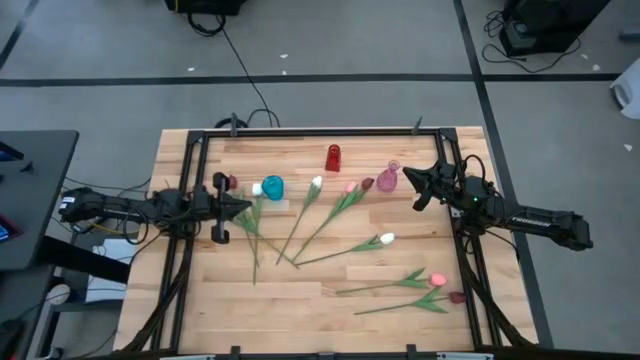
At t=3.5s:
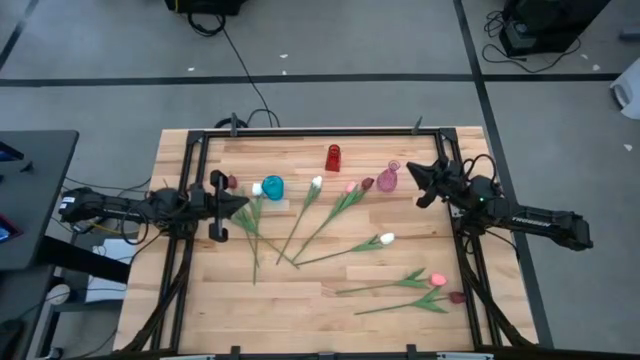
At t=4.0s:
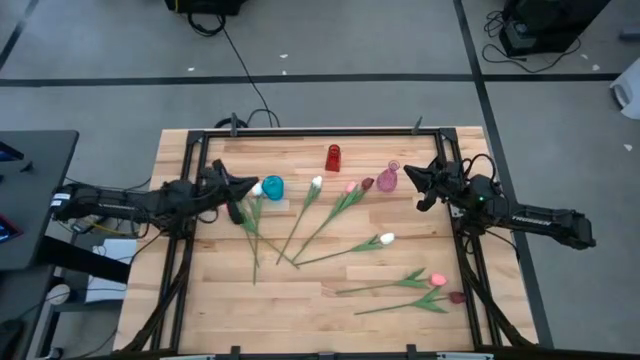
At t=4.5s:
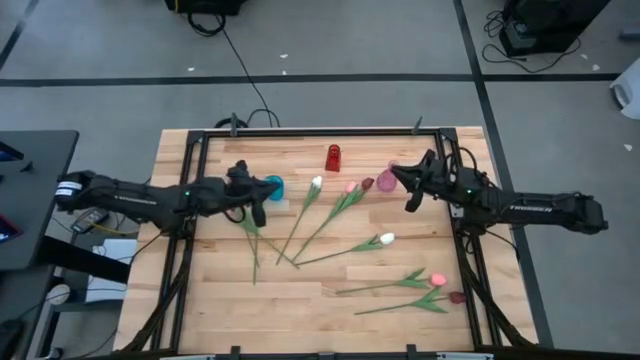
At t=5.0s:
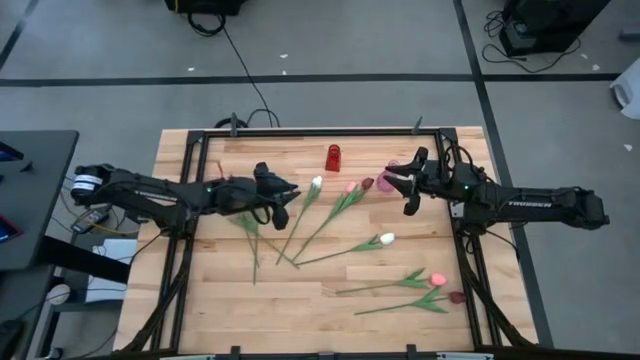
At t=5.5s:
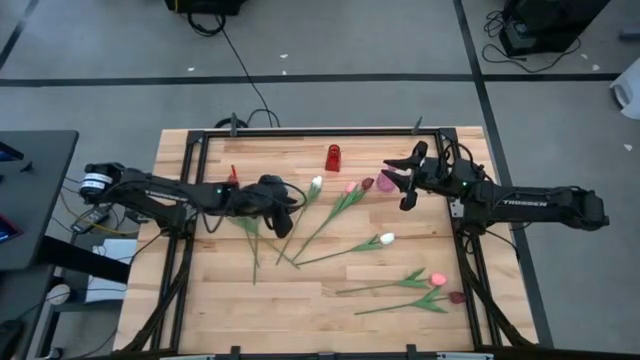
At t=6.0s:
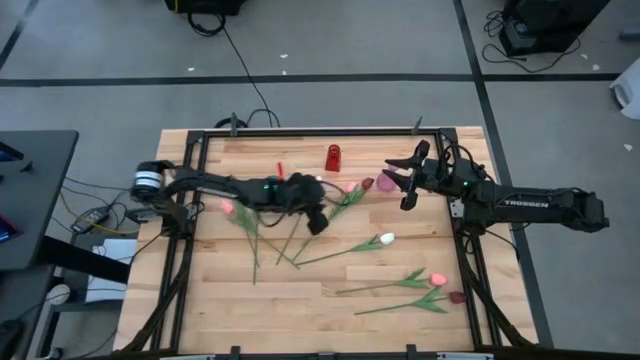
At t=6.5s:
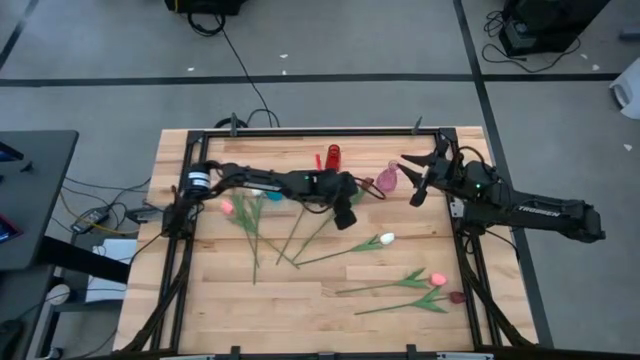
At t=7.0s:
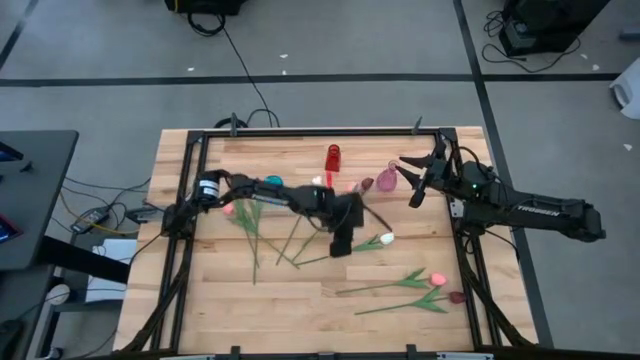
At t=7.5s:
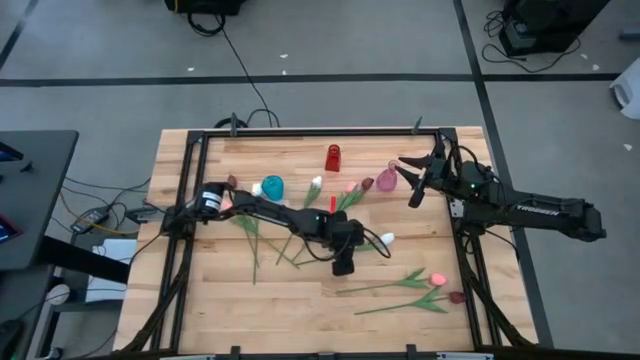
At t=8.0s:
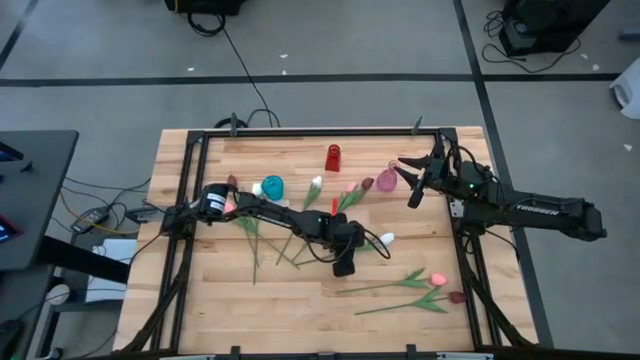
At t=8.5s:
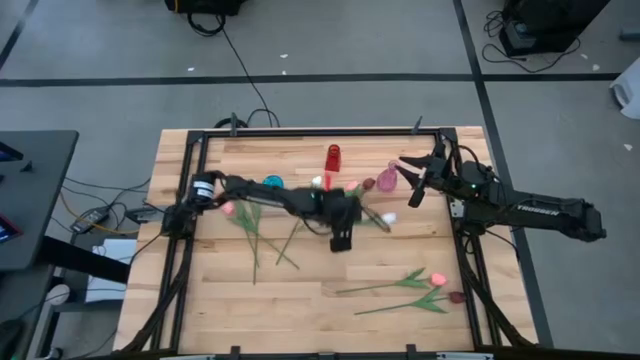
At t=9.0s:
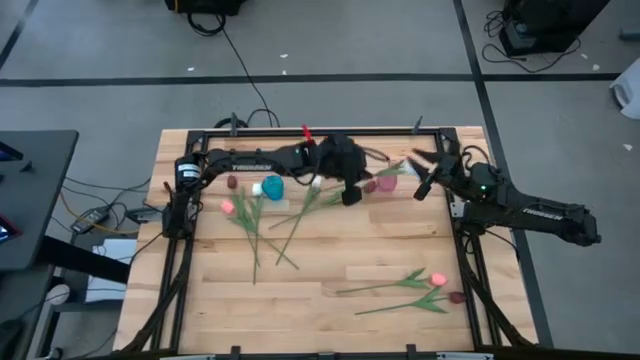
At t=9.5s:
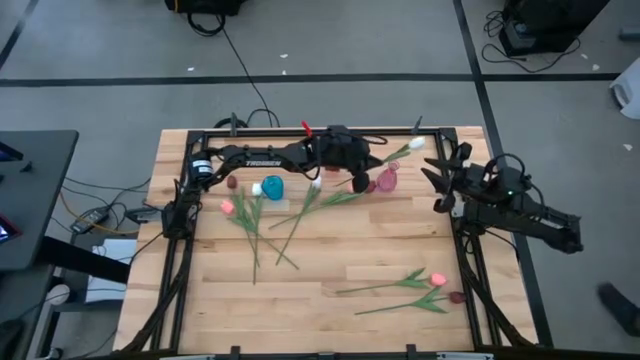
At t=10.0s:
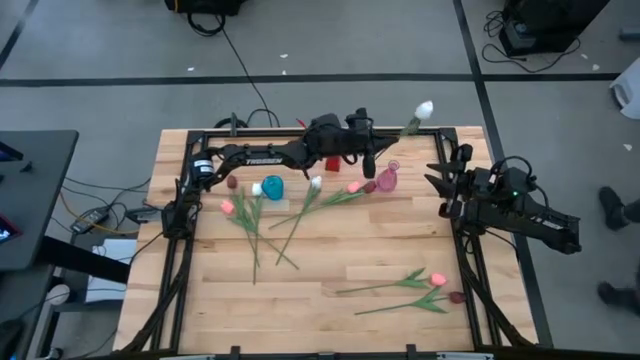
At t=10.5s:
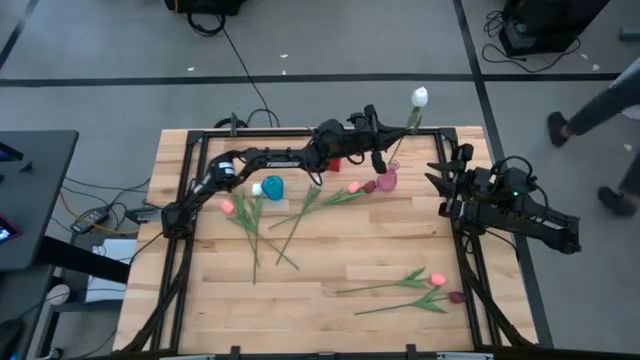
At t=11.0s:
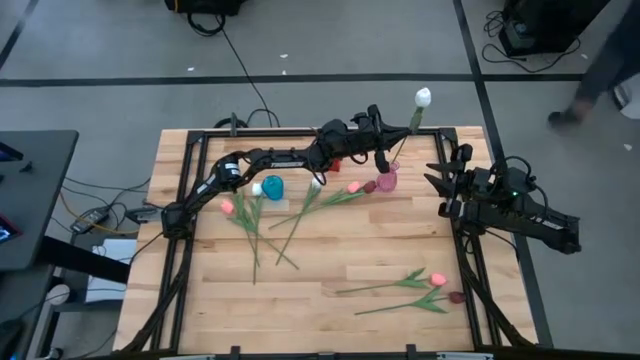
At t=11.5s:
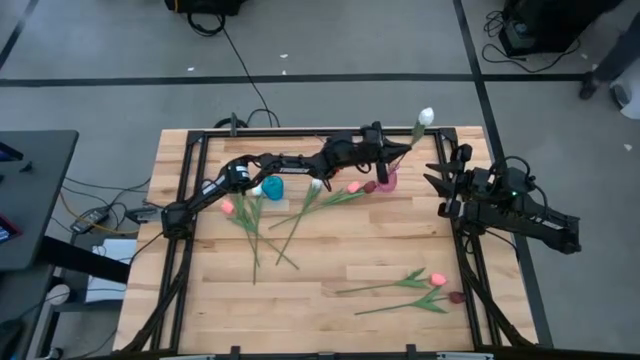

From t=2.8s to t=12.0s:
Task: Sort flowers into vase by color
Put the right white tulip into the pink vase

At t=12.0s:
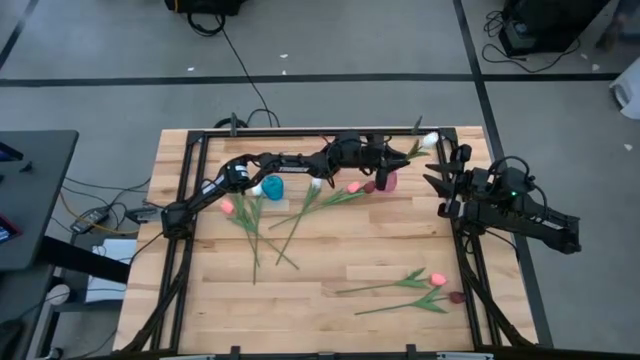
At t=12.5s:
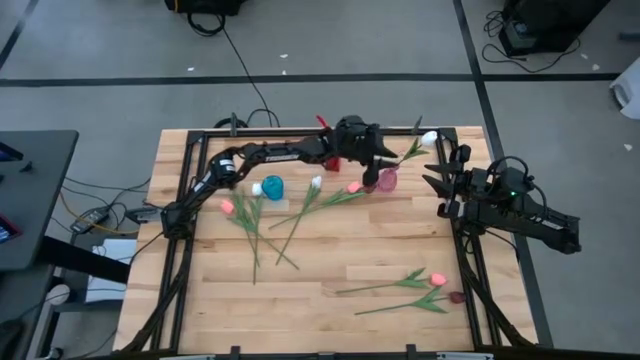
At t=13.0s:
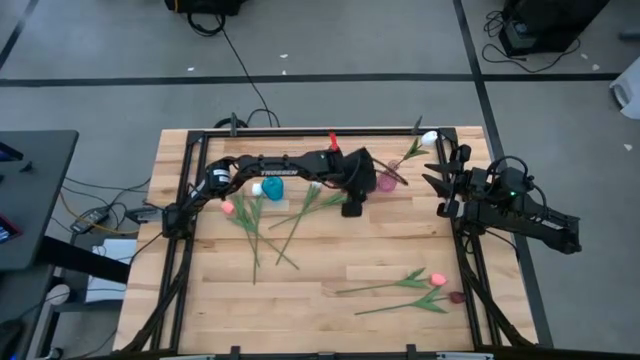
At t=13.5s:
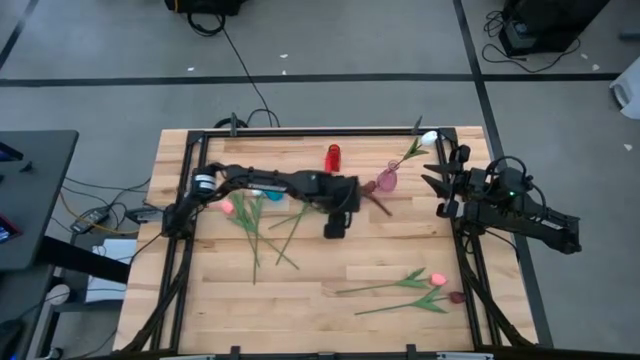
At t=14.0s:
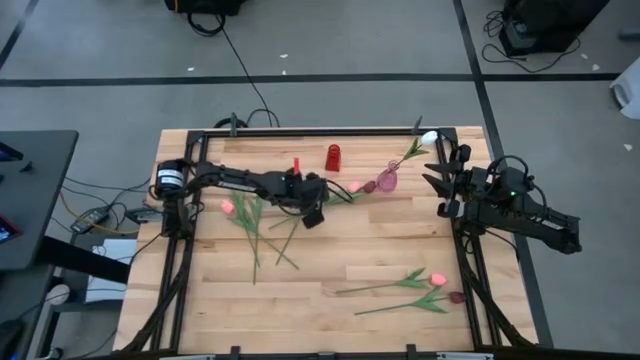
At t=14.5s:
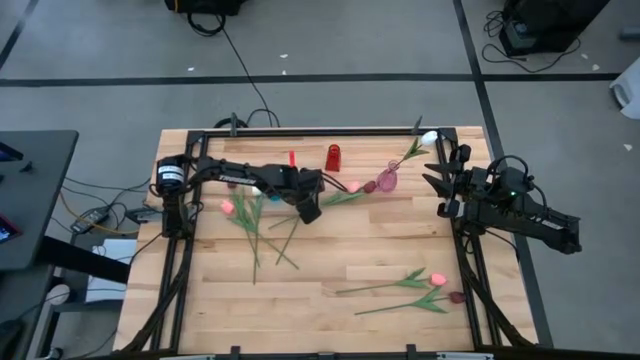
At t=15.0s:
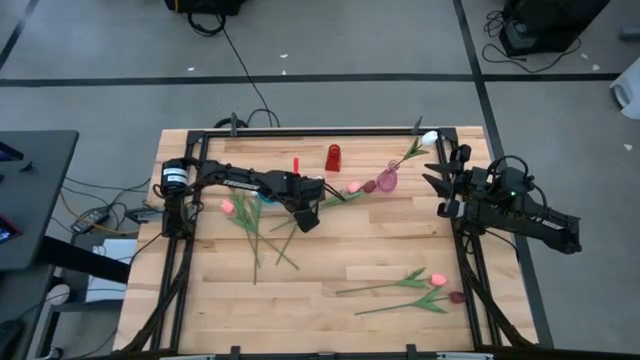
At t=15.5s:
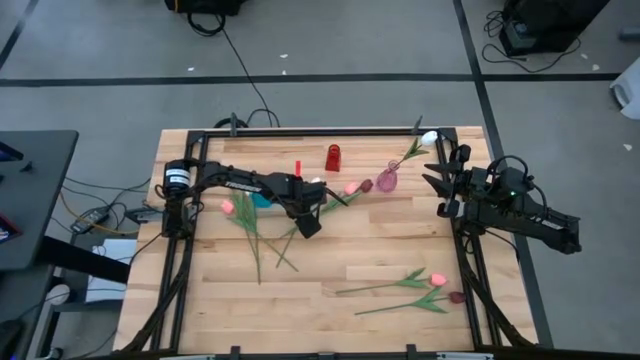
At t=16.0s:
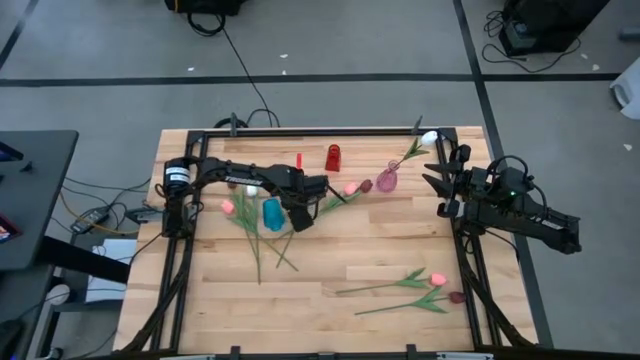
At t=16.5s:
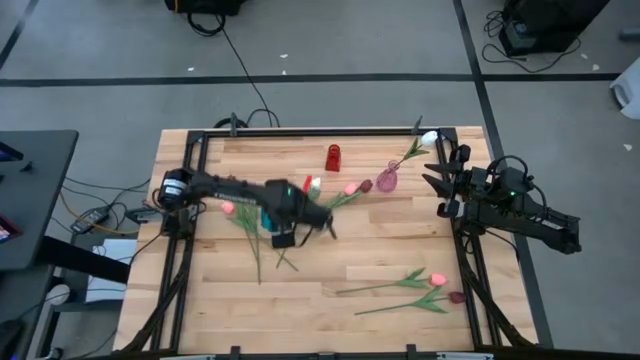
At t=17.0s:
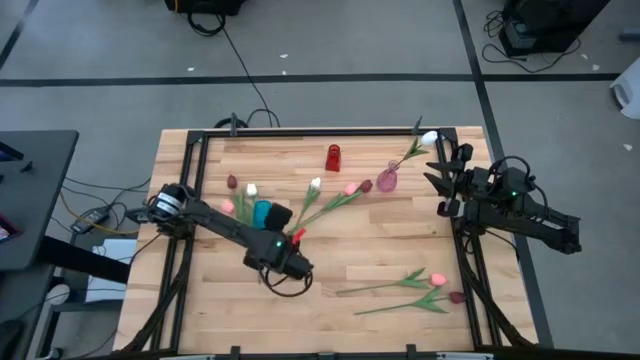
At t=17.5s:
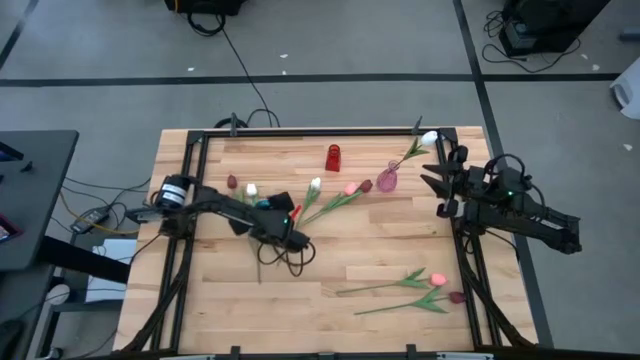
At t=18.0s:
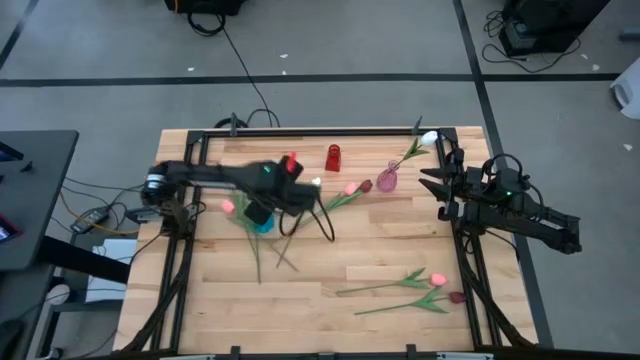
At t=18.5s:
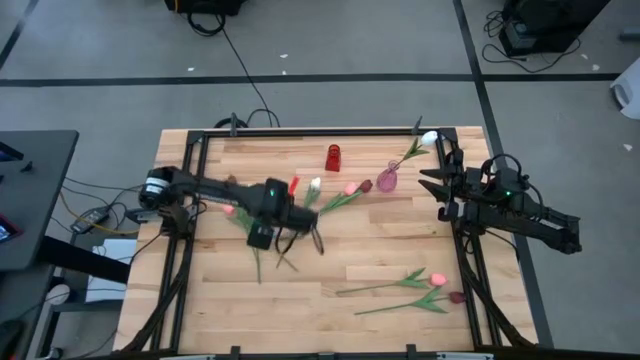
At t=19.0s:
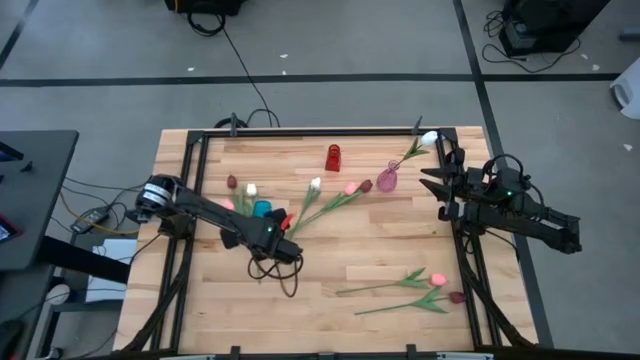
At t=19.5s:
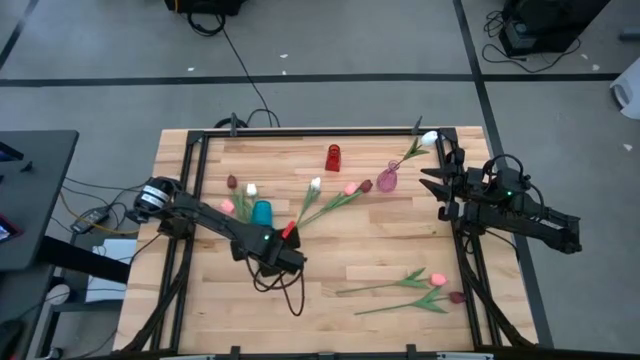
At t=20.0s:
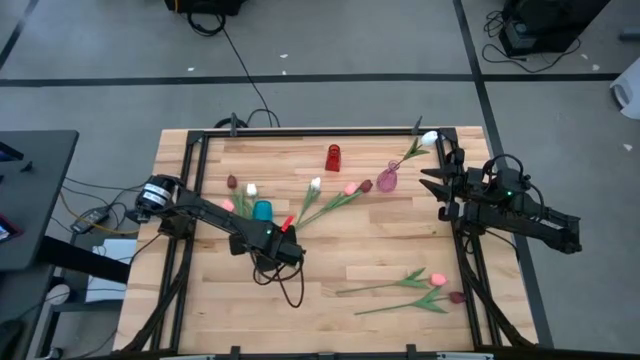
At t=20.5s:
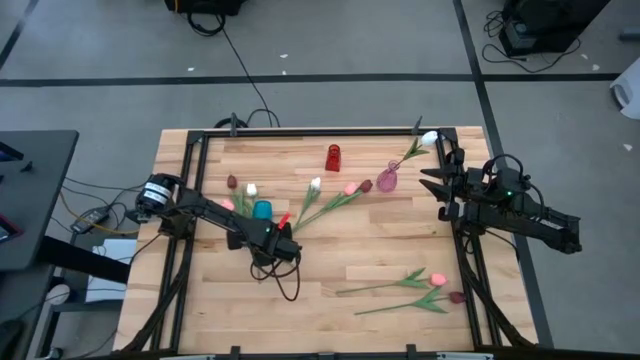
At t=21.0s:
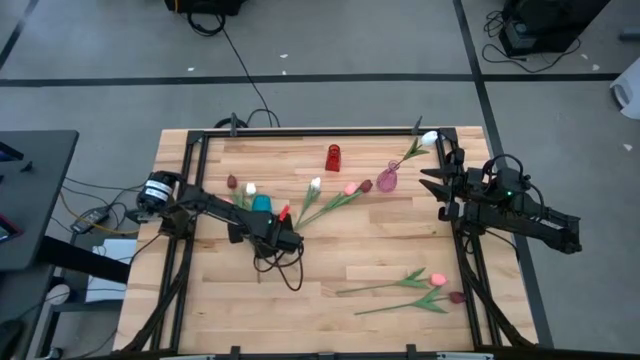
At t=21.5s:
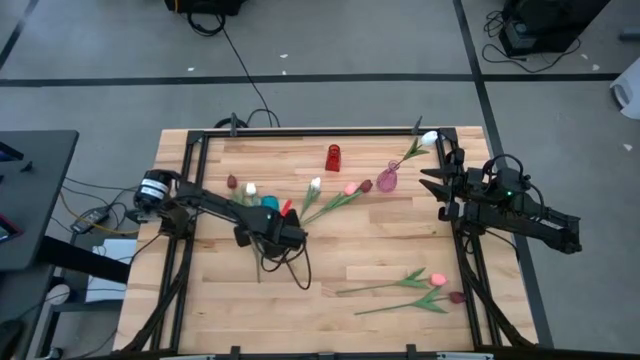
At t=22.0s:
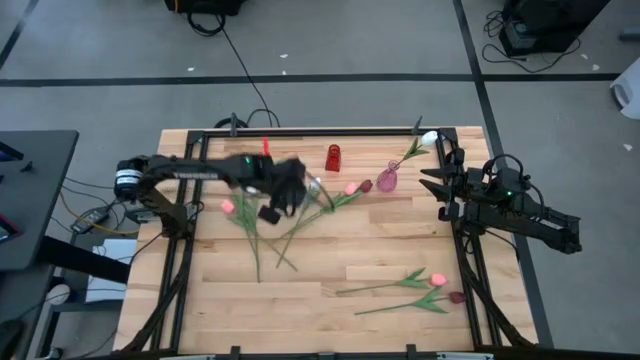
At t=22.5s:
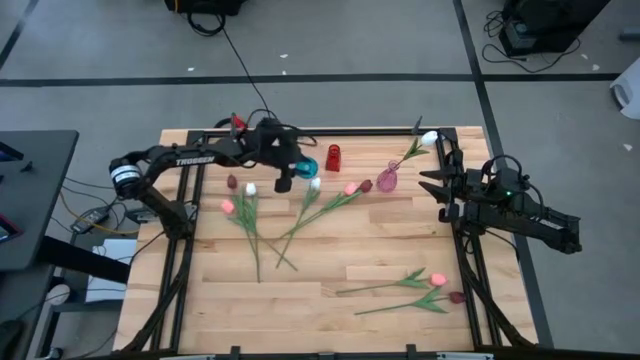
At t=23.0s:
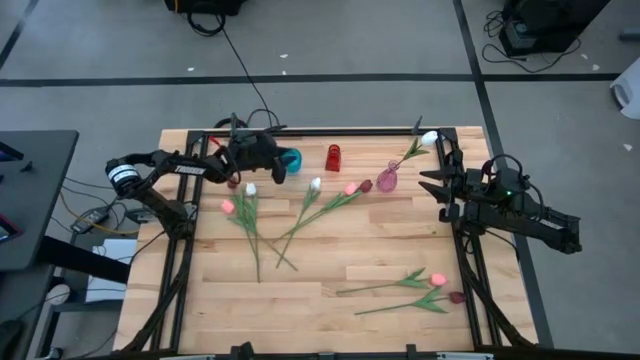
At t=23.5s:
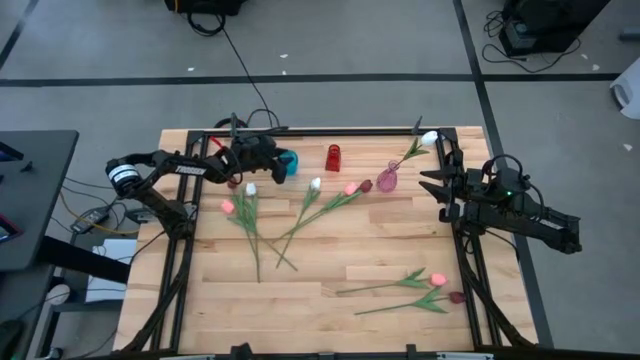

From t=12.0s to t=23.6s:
Adjust the blue vase
